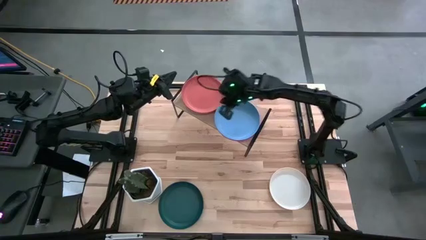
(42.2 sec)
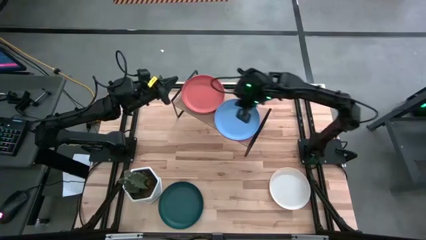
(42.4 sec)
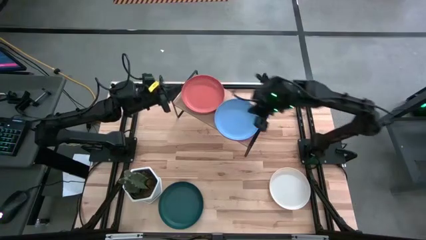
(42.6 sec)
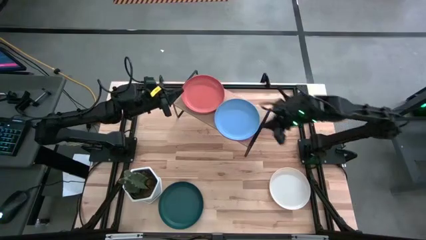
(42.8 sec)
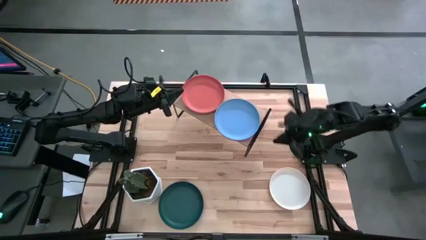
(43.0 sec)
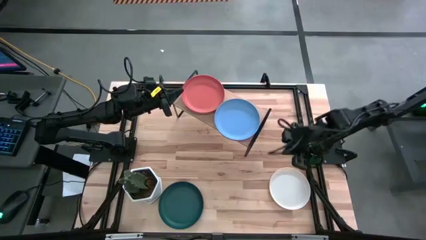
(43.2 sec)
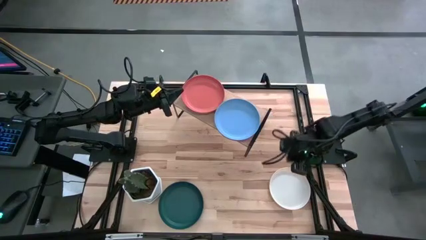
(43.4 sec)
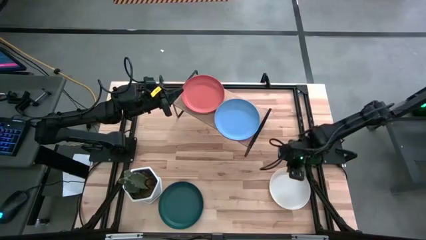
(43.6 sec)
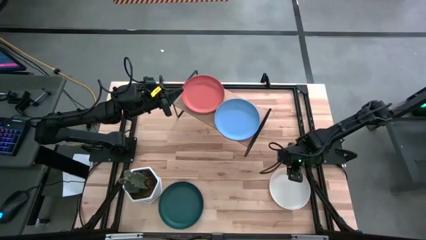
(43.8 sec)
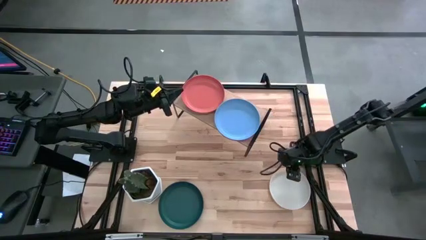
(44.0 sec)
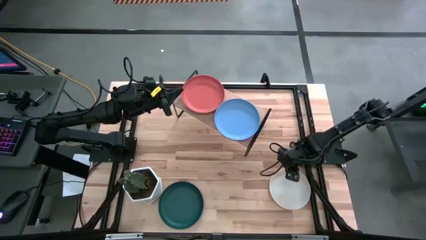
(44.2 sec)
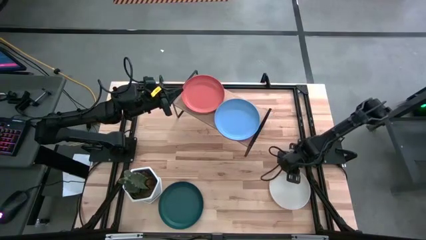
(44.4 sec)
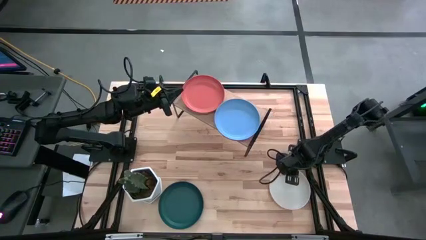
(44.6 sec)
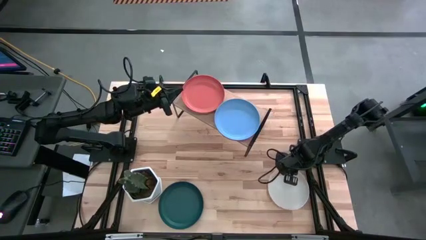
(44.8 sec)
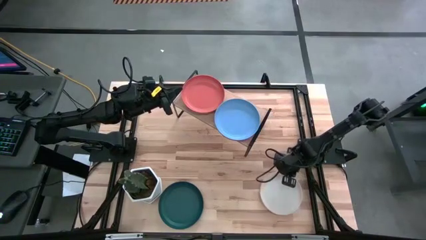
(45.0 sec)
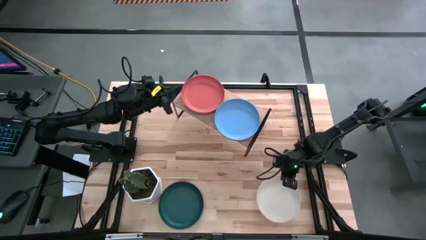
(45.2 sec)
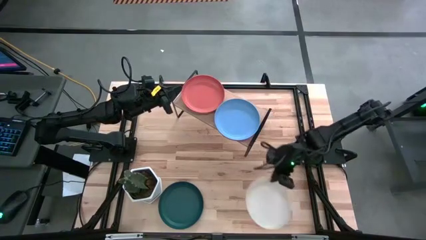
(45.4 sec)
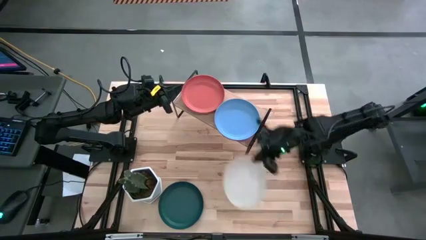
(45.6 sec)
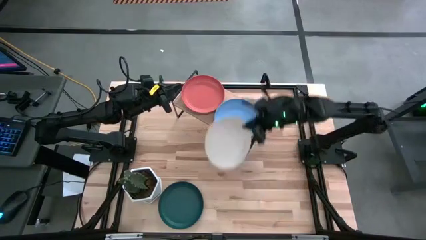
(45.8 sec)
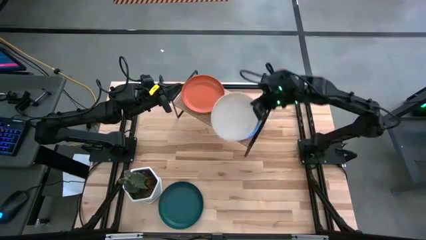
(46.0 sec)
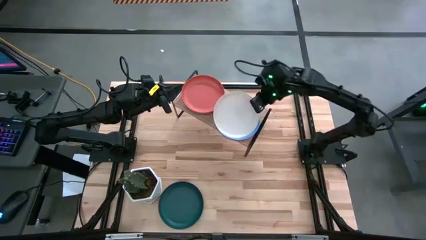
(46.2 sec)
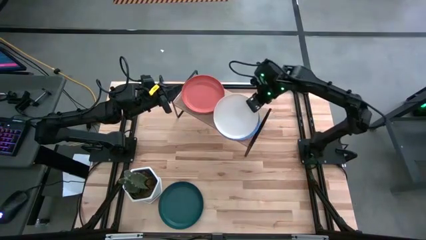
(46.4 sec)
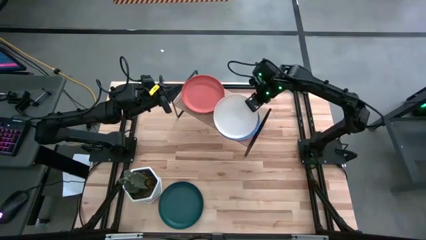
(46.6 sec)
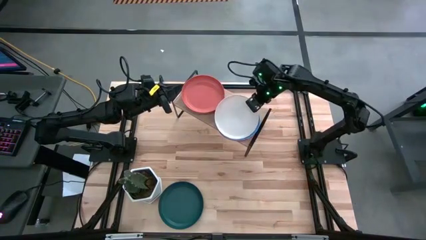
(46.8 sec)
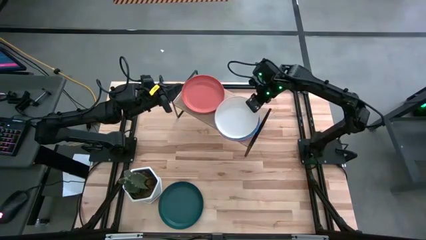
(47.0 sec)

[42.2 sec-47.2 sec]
Task: Place and stack plates onto a shelf
Stack the white plate on top of the blue plate on the shelf

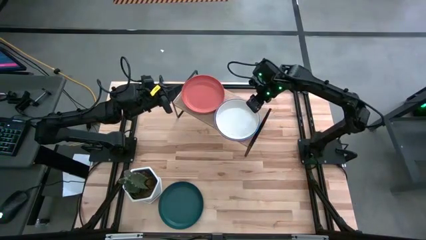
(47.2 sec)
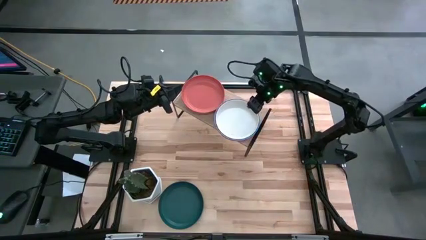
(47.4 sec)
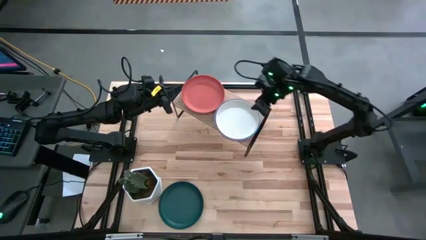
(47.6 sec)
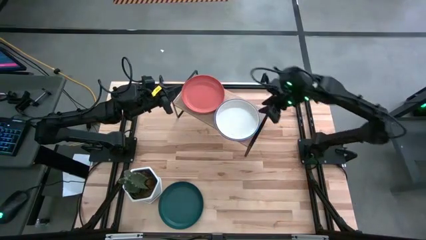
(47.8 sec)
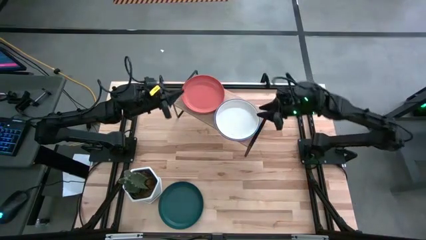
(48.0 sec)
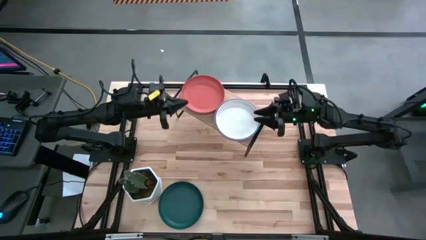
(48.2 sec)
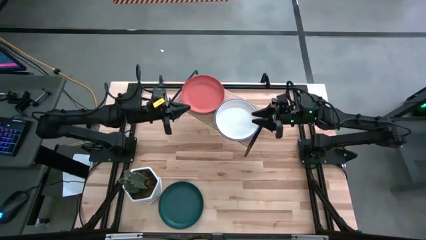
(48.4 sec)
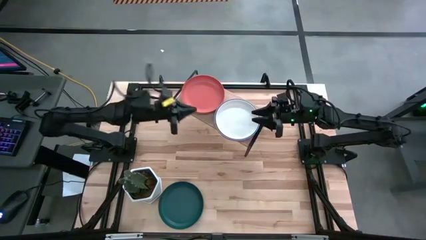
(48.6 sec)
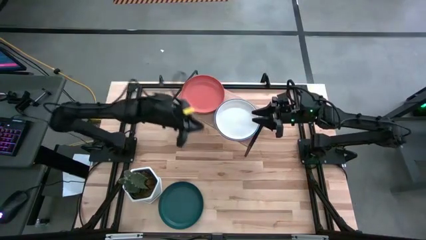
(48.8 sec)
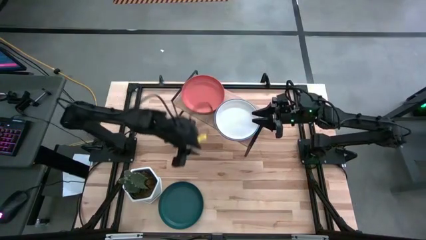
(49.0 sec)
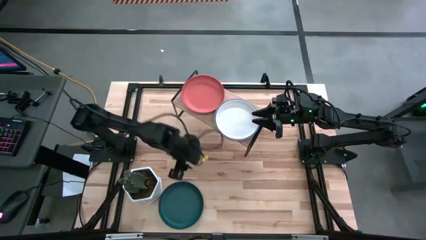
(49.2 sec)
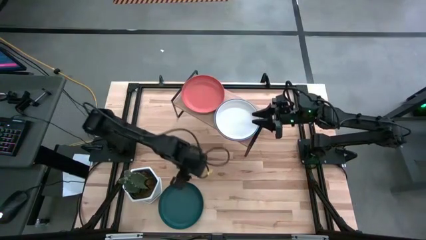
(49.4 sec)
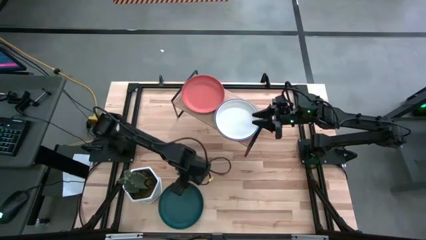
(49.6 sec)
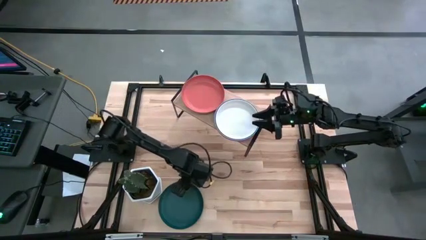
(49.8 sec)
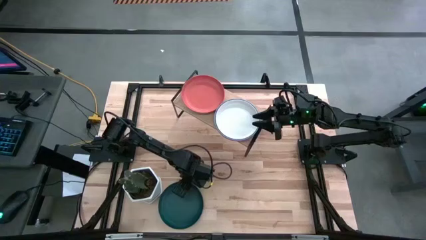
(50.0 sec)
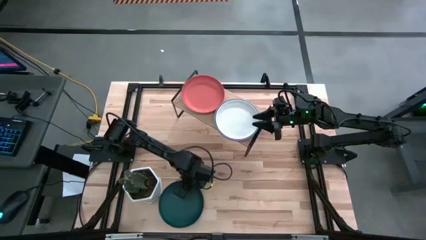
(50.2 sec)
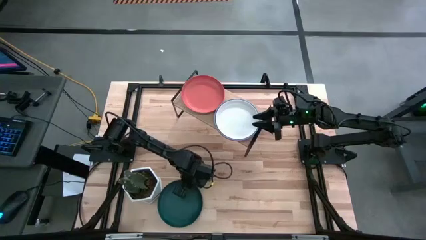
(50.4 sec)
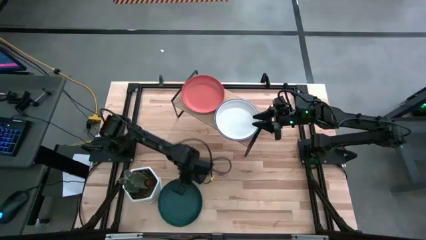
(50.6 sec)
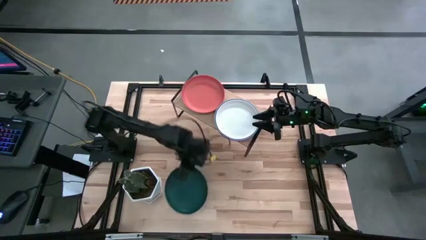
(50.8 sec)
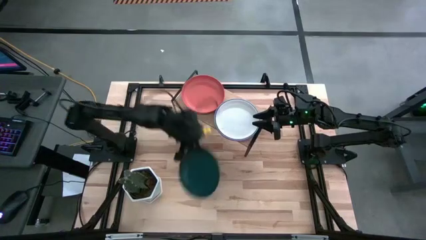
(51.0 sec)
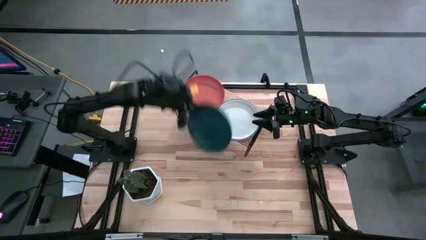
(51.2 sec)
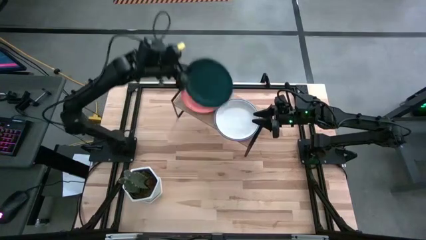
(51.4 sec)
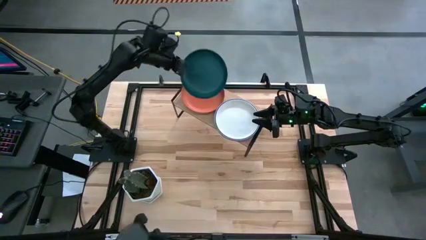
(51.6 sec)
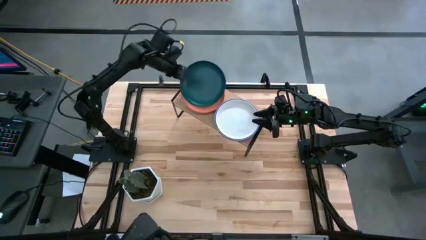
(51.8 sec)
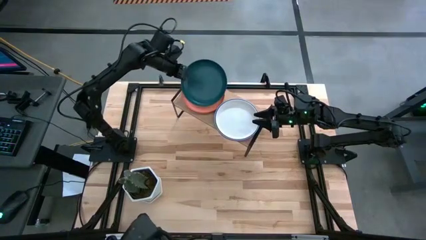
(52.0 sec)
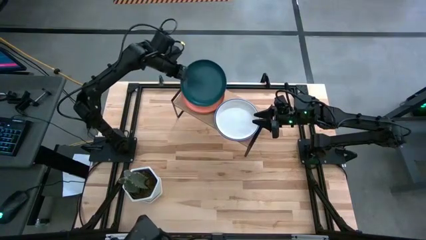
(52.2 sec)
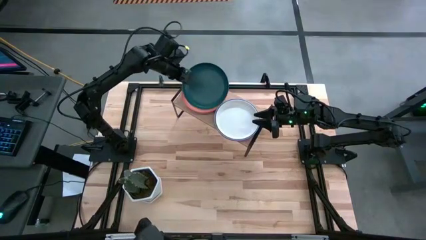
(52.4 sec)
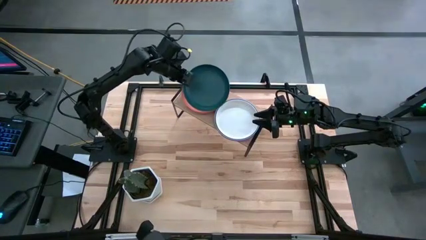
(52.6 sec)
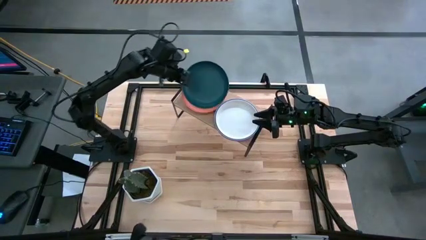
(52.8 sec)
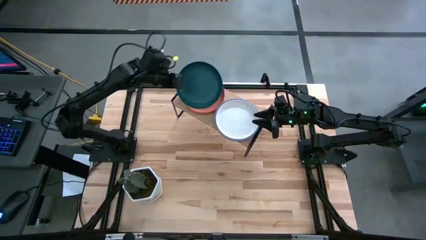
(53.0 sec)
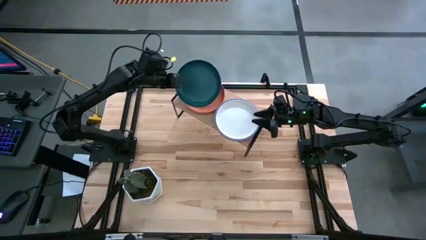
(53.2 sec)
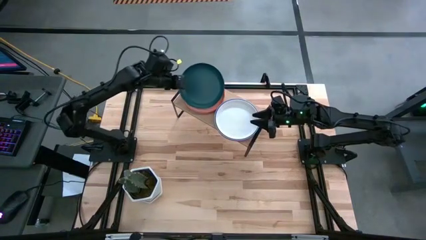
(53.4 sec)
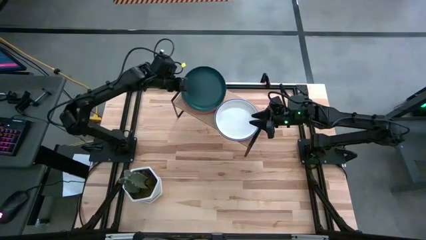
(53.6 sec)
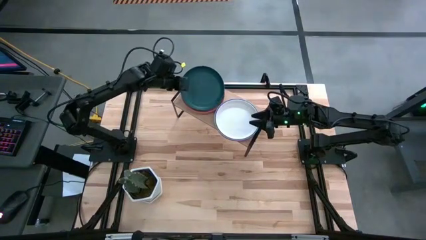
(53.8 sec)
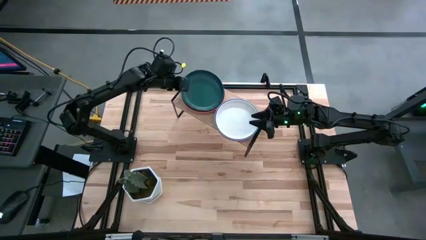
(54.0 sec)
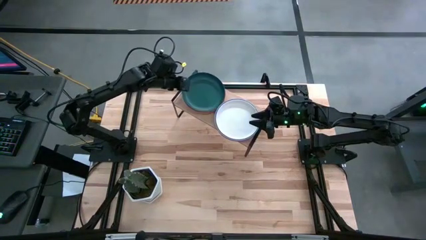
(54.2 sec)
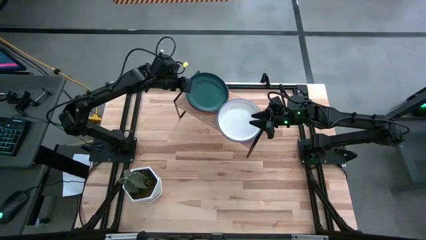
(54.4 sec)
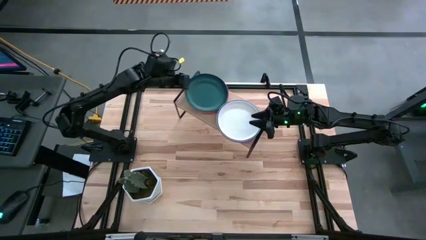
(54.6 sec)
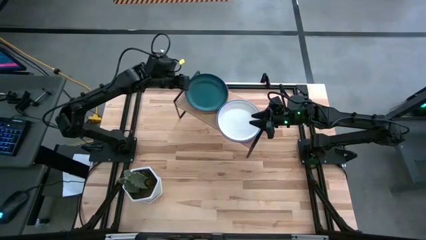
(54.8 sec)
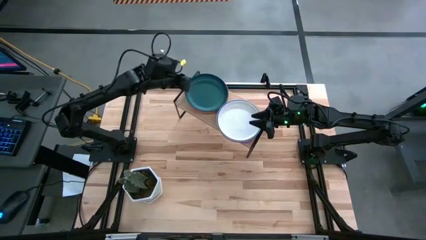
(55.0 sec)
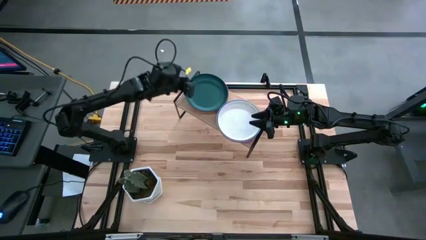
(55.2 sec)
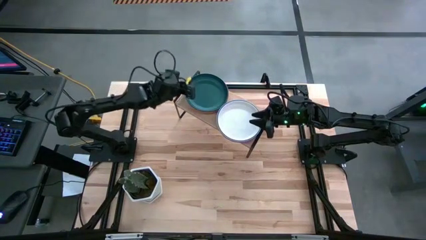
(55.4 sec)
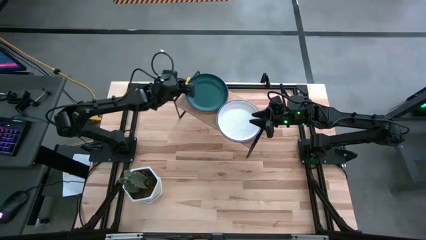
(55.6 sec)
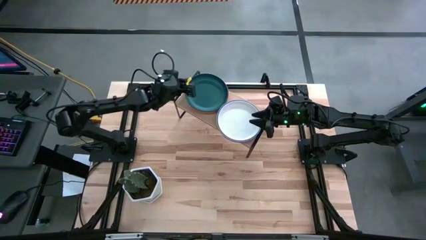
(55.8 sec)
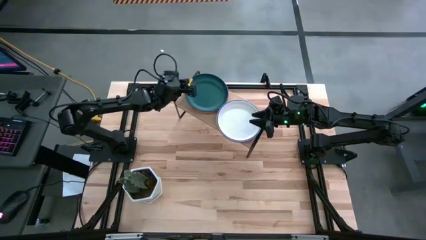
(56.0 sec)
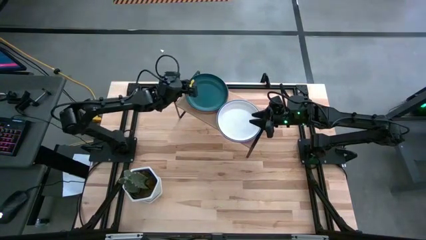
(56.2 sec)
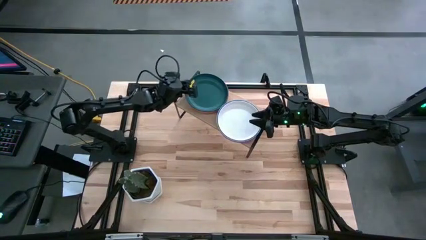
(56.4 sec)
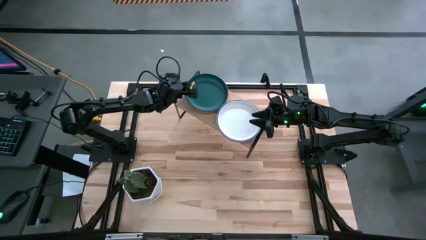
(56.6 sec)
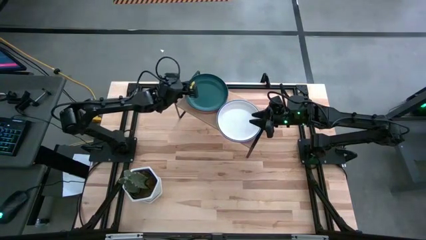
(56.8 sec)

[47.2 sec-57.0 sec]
Stack the green plate on top of the dark orange plate on the shelf

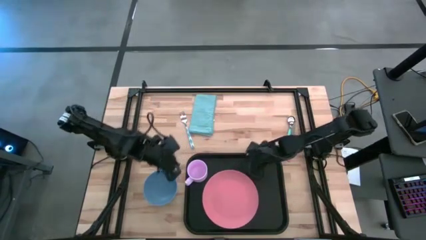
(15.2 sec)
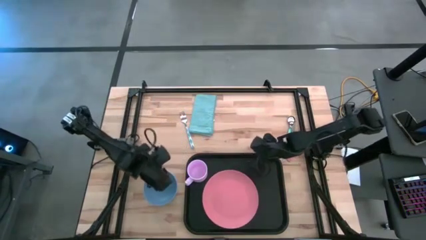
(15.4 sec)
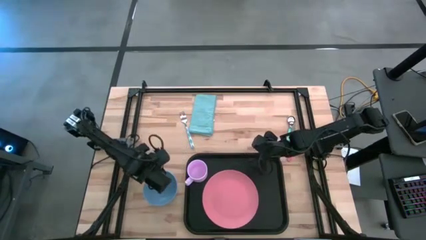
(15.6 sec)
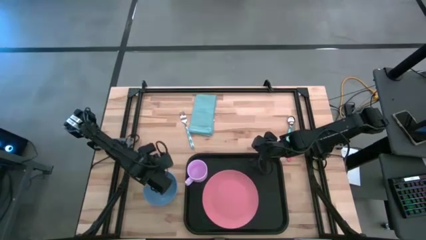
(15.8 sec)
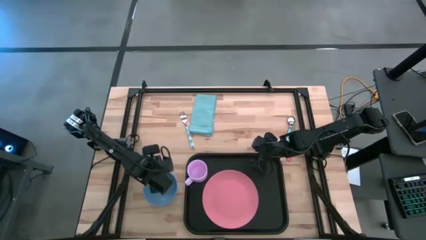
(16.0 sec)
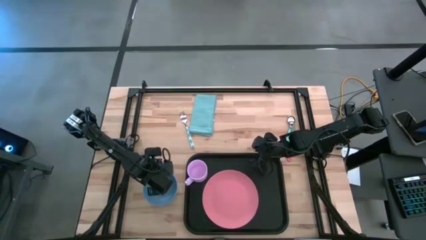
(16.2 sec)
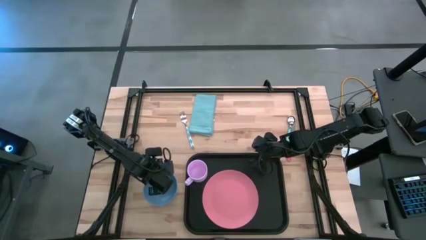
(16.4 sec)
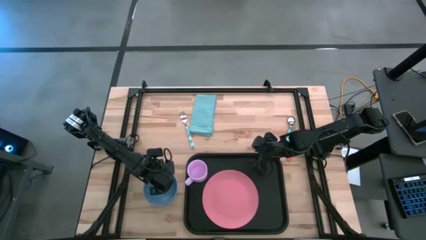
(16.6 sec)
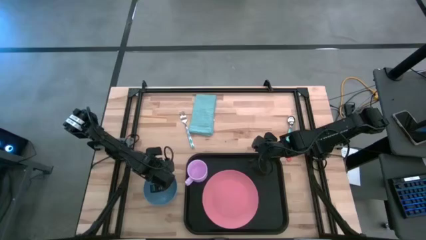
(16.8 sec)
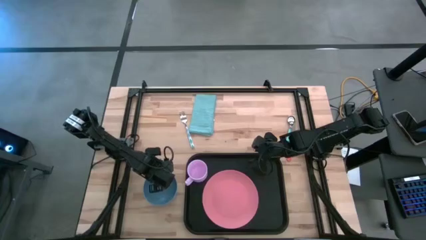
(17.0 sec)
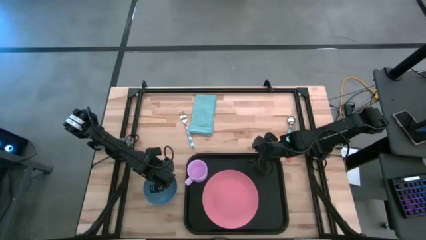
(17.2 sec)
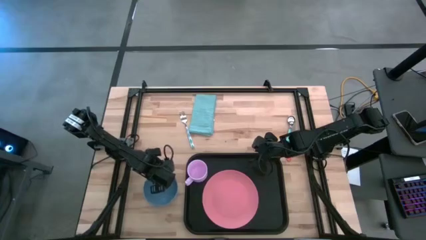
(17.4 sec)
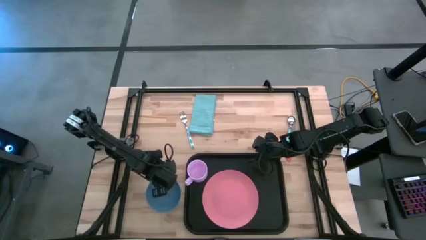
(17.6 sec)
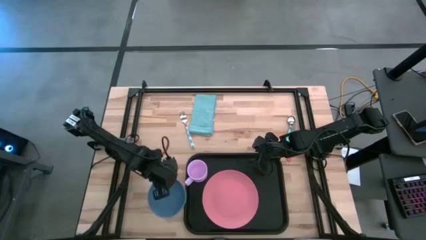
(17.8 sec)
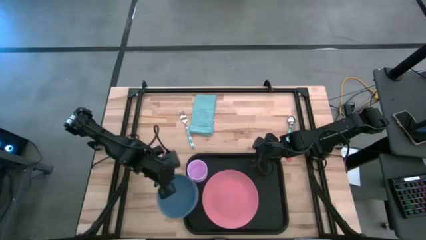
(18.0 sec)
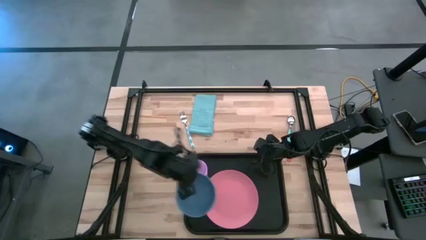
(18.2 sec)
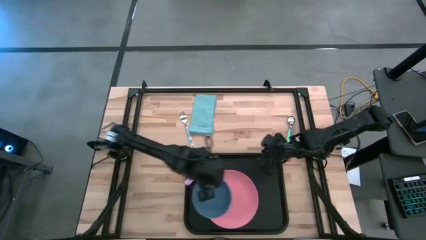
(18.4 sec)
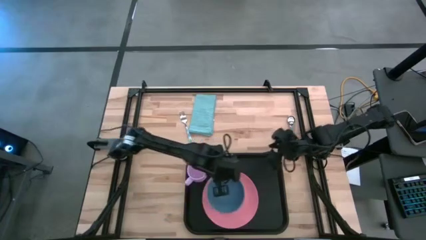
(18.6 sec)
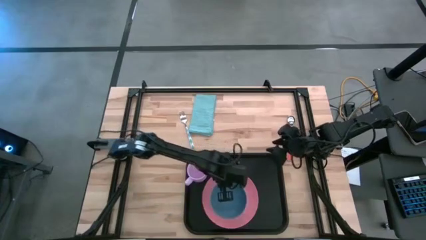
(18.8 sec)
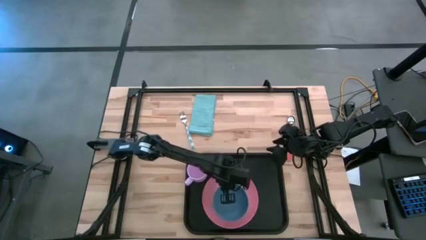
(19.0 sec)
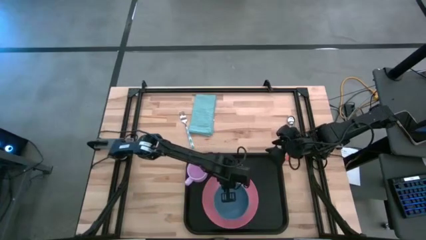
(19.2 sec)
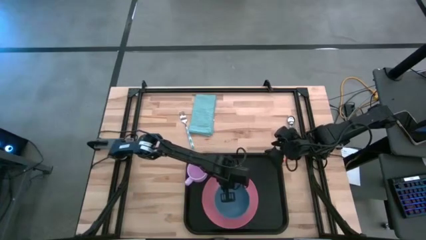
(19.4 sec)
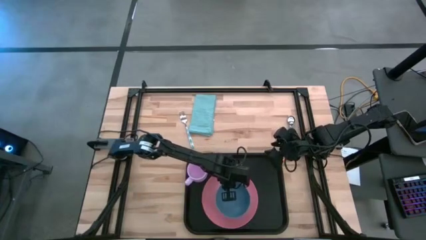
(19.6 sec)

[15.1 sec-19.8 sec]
Task: Set up tray
Put the blue bowl on the pink plate
